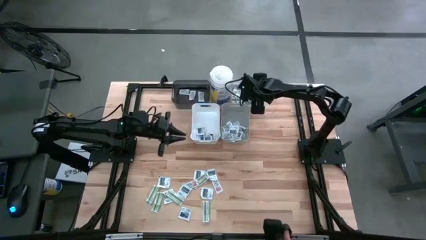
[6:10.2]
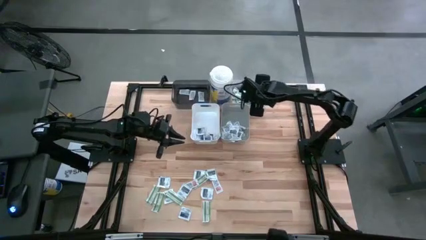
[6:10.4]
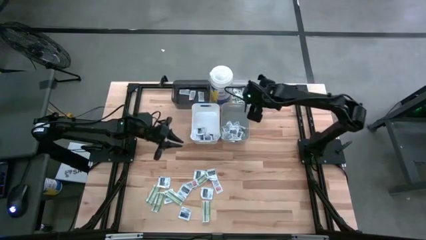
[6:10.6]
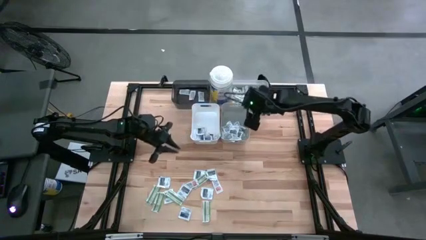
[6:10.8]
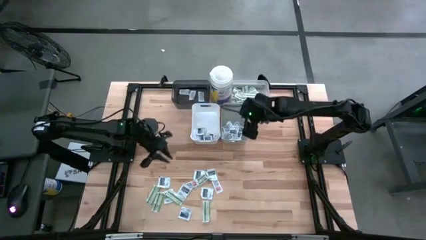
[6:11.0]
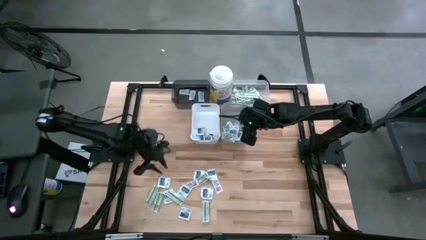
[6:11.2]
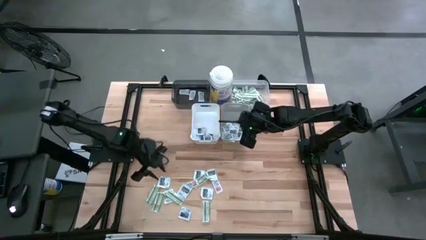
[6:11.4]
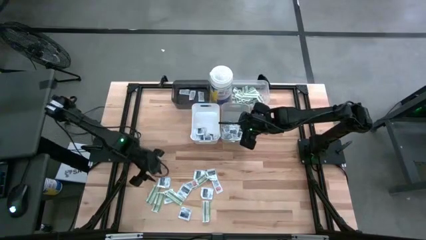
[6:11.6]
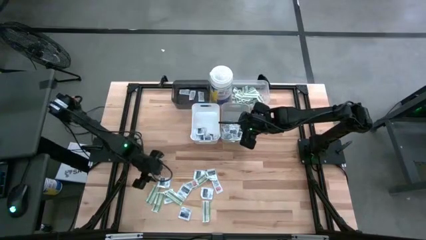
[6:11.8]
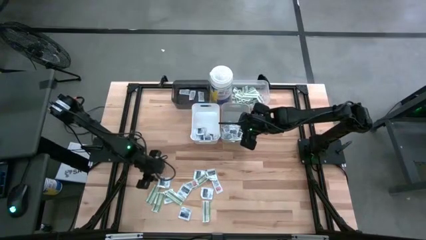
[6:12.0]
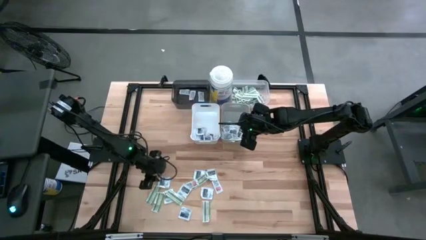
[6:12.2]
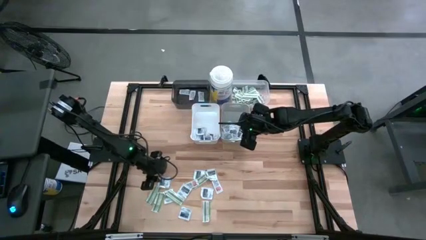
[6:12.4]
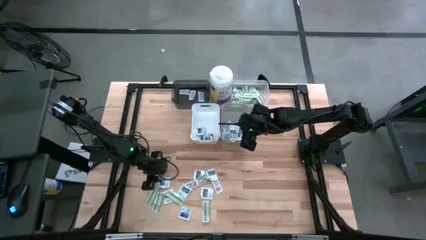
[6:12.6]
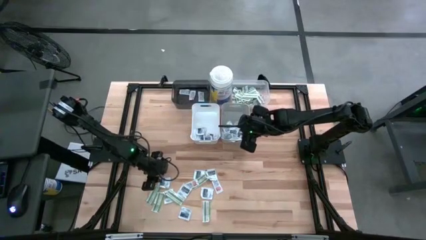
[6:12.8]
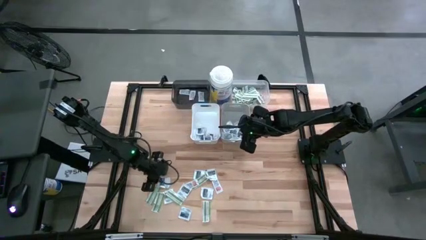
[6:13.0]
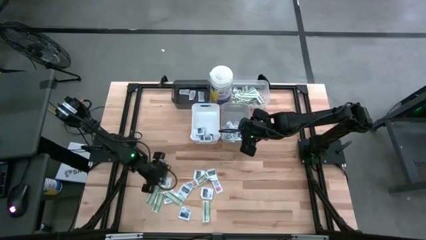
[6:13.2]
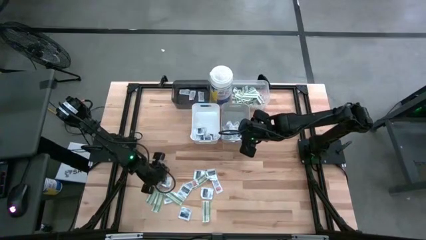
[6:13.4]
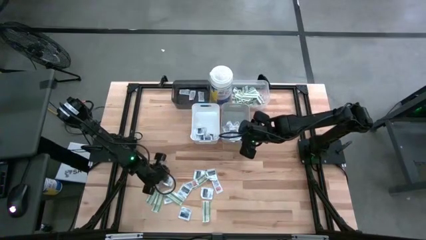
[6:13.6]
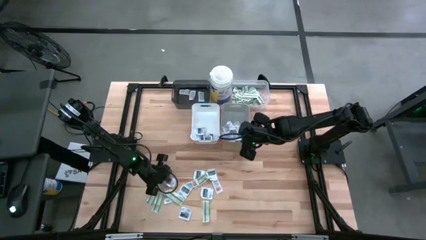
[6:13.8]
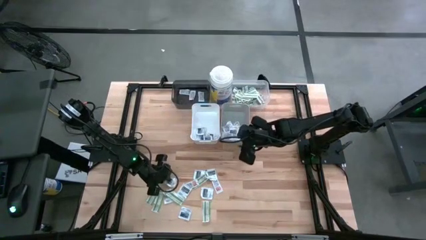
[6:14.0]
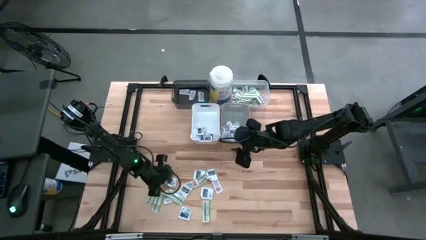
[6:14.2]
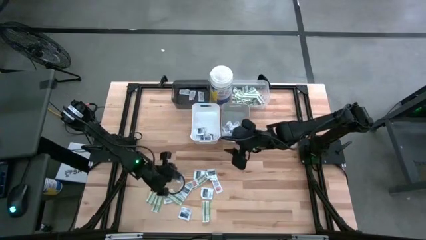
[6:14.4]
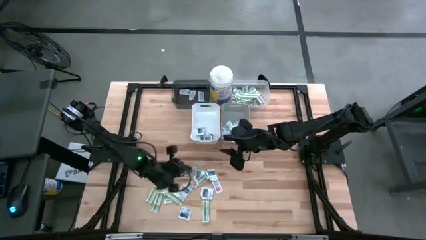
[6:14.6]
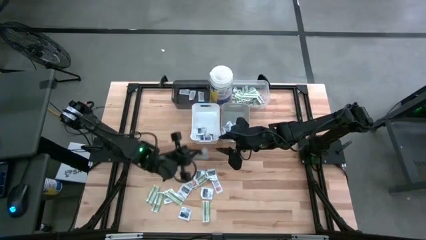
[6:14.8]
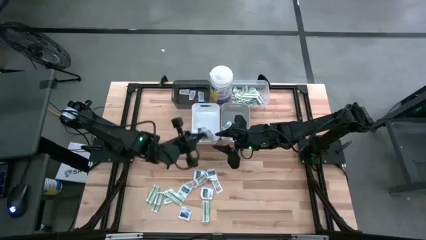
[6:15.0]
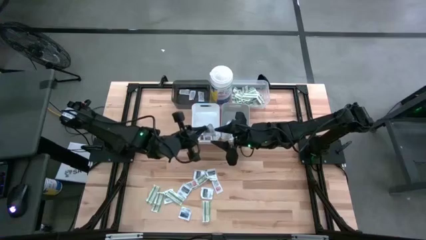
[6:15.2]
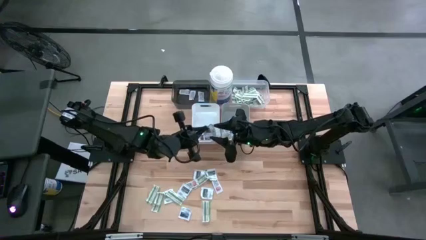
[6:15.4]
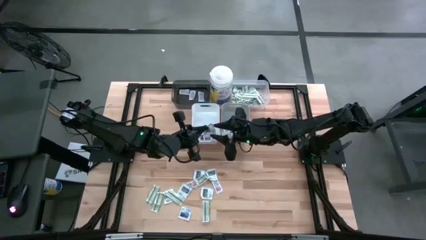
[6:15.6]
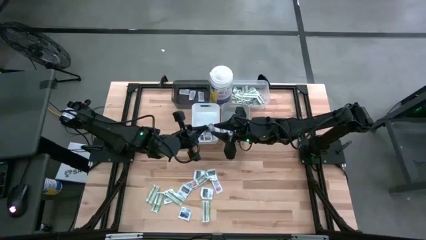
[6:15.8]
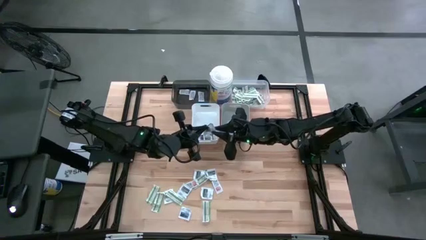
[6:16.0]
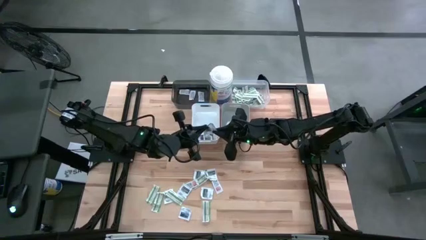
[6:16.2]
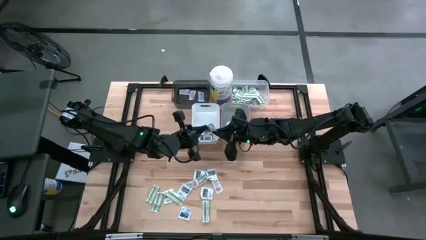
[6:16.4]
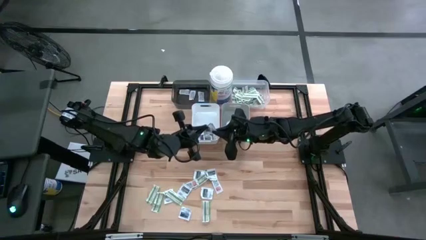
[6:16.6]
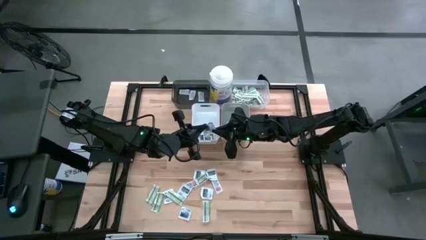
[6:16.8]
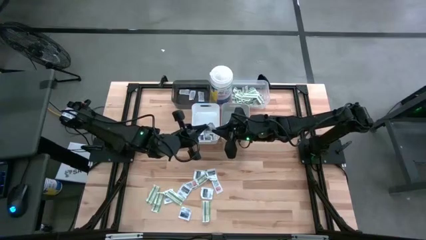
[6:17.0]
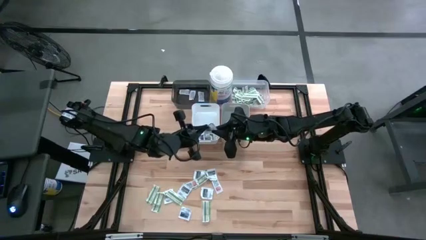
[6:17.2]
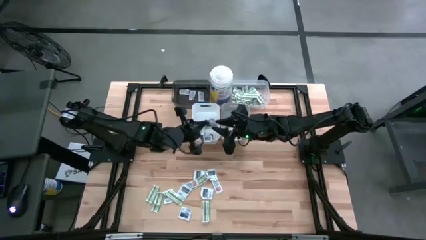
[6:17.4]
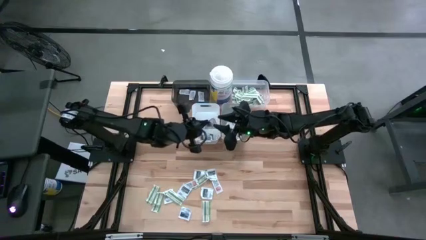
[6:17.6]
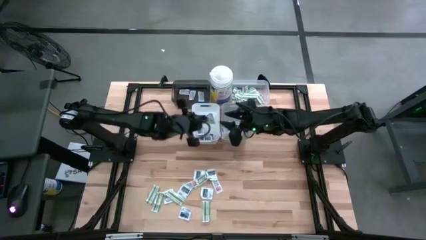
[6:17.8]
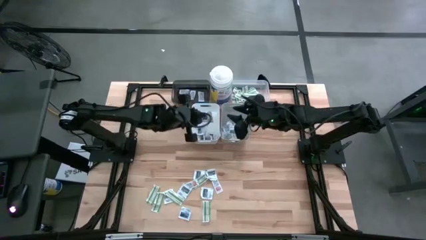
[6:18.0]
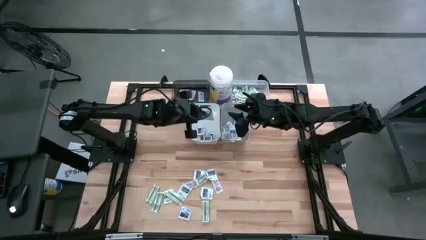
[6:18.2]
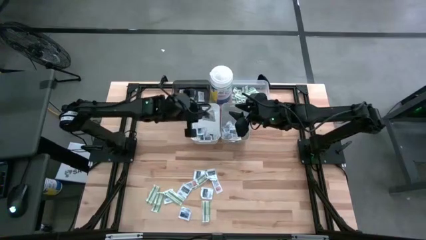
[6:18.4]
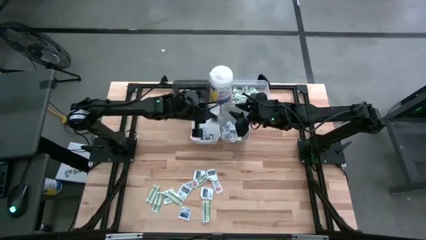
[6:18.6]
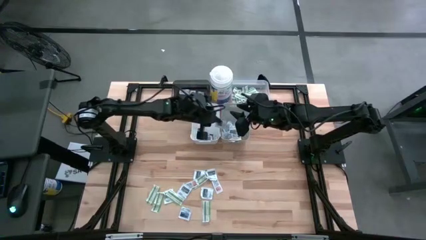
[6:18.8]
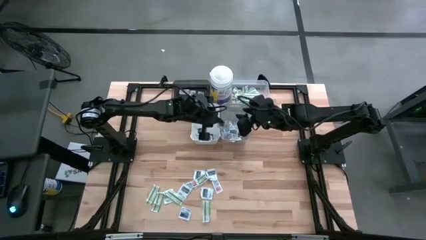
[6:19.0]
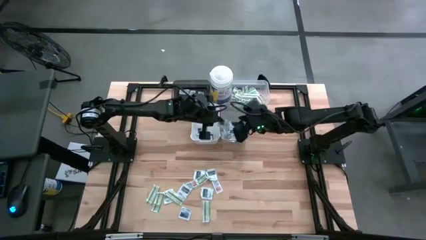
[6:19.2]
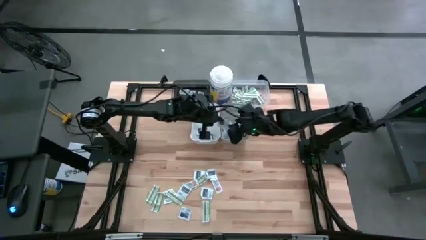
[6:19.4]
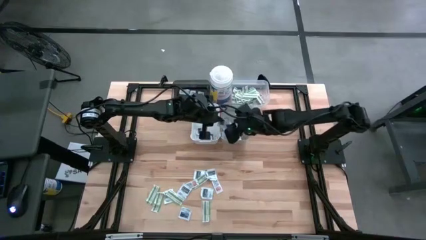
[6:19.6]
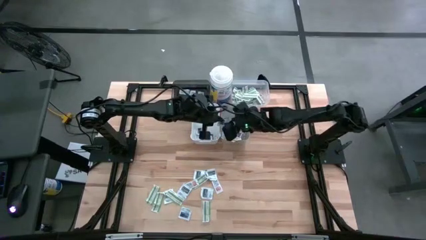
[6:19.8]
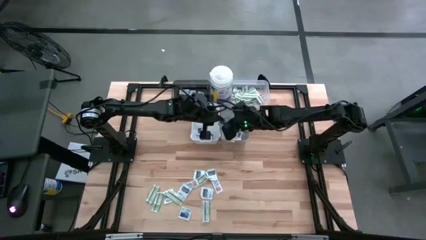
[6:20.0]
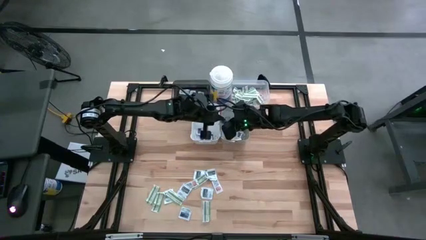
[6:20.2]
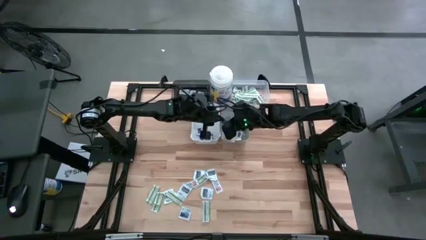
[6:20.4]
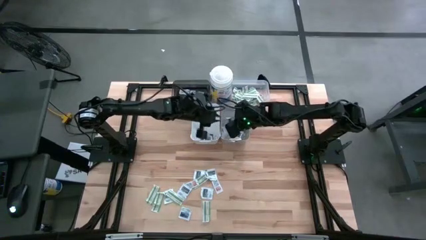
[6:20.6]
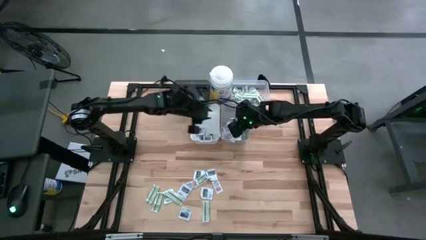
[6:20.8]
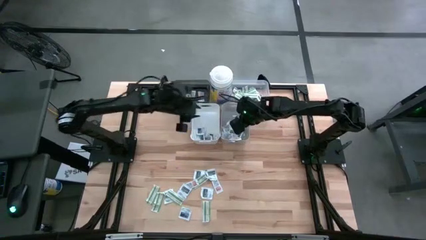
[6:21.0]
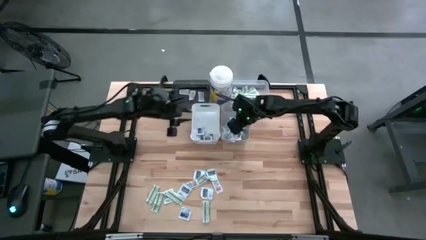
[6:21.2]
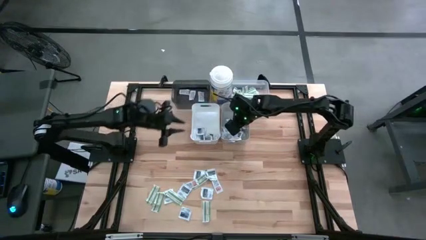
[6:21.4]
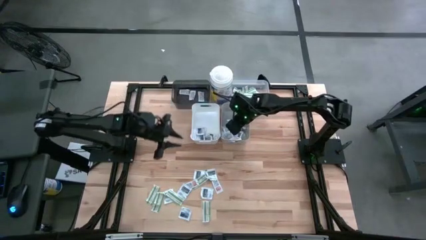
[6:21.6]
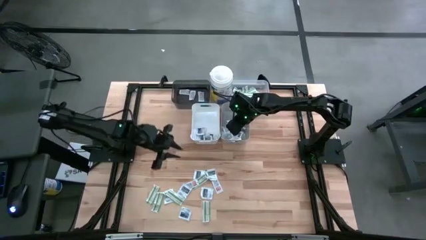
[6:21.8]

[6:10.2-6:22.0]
Task: Pick & Place First Aid Supplies
Put the wipe into the gray bin
